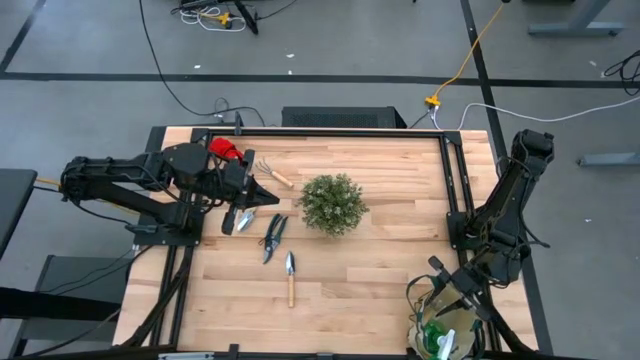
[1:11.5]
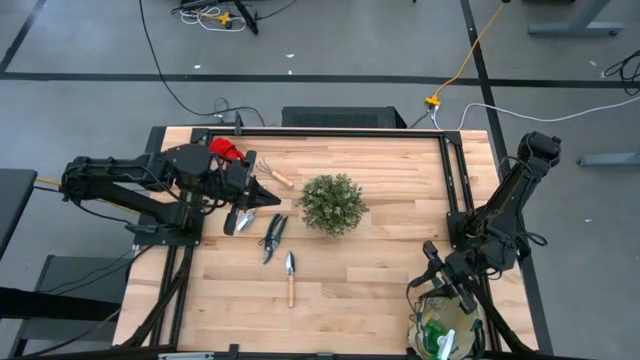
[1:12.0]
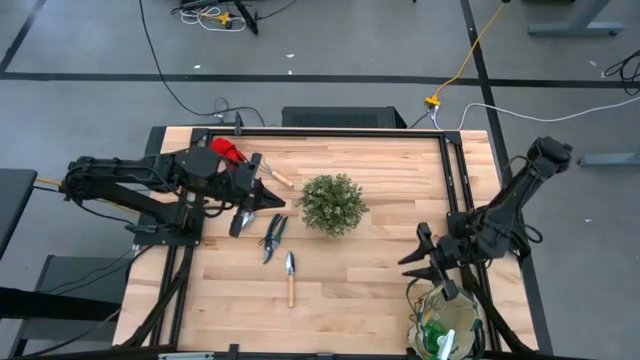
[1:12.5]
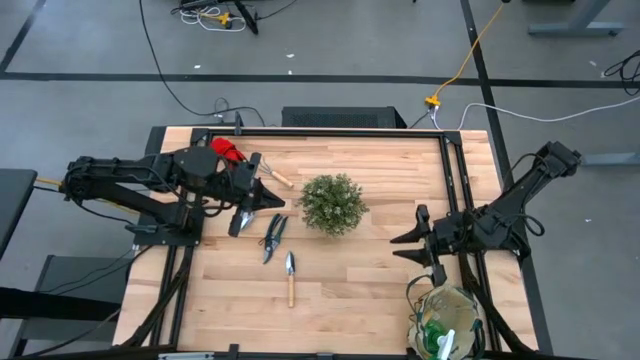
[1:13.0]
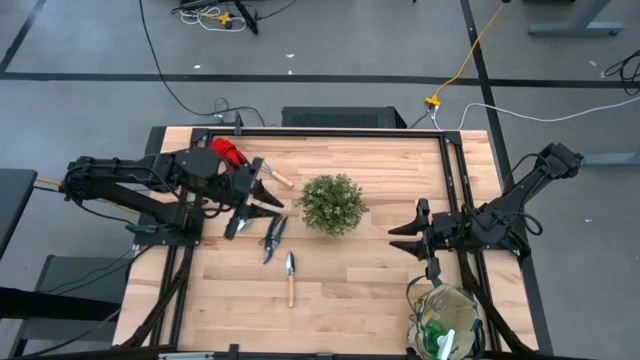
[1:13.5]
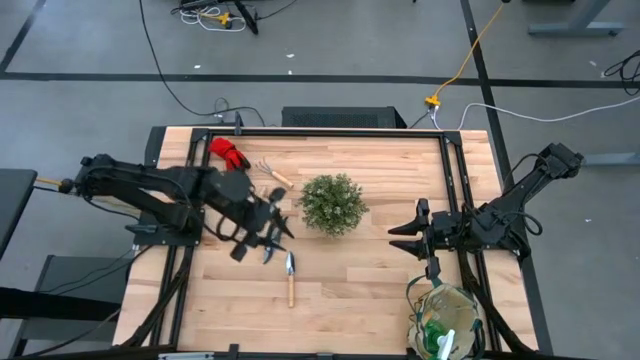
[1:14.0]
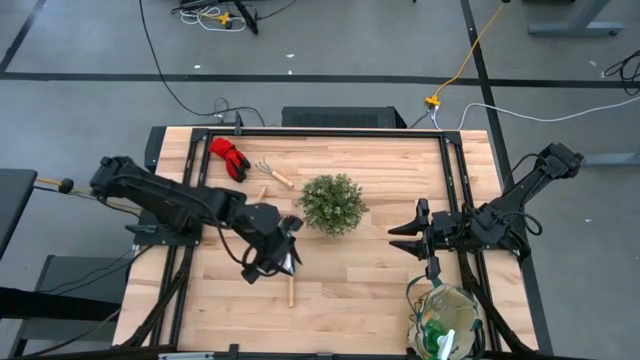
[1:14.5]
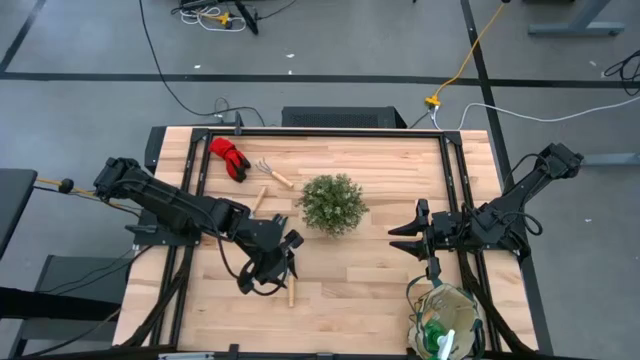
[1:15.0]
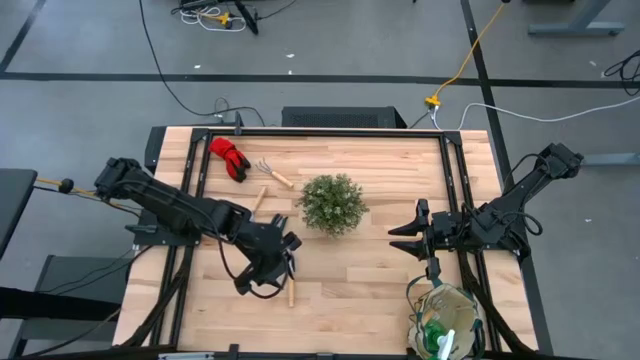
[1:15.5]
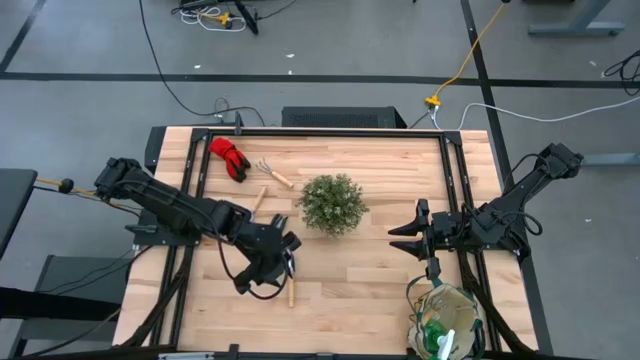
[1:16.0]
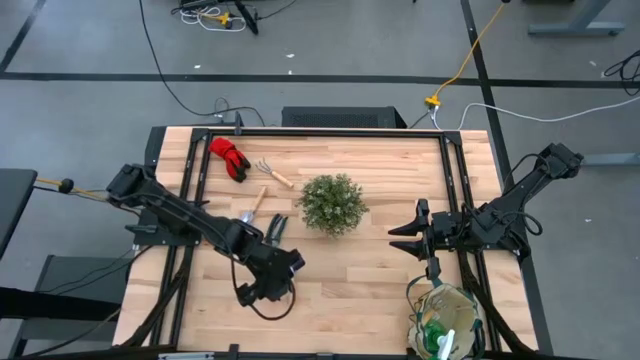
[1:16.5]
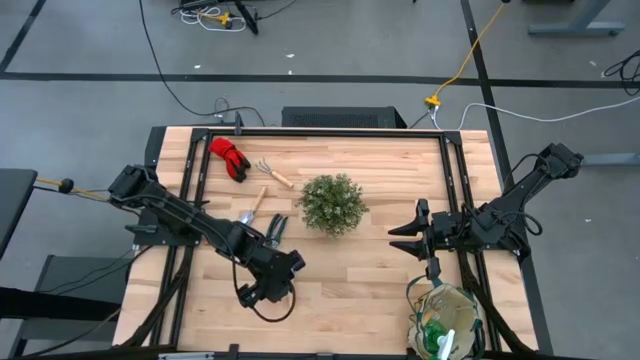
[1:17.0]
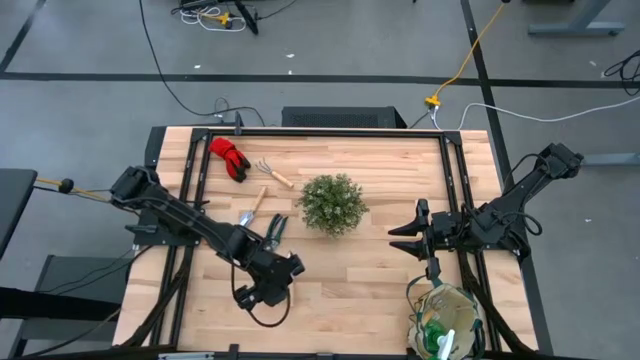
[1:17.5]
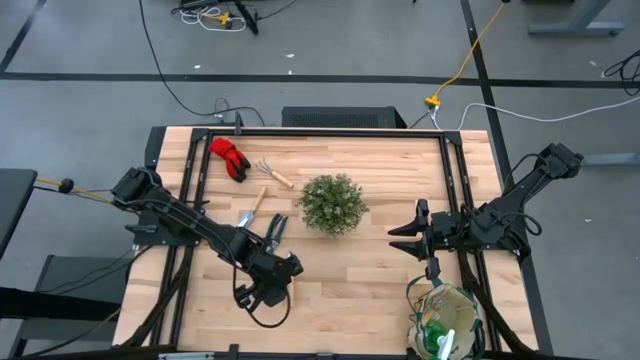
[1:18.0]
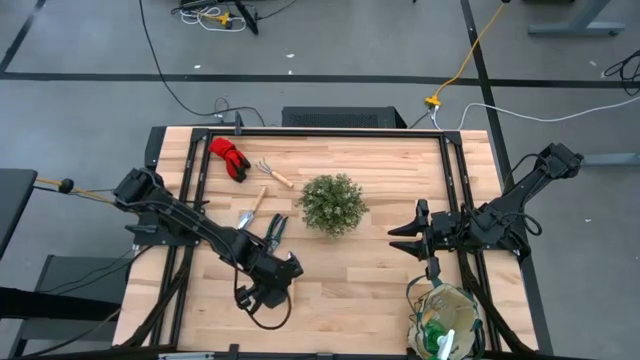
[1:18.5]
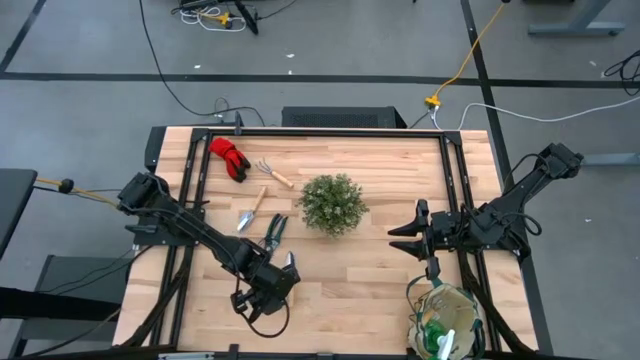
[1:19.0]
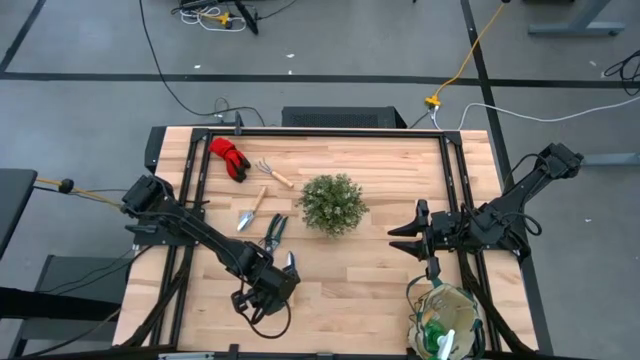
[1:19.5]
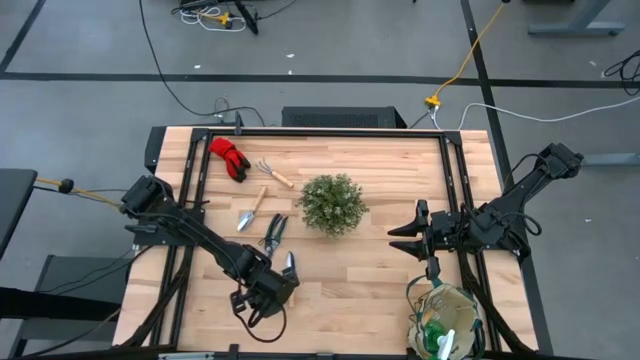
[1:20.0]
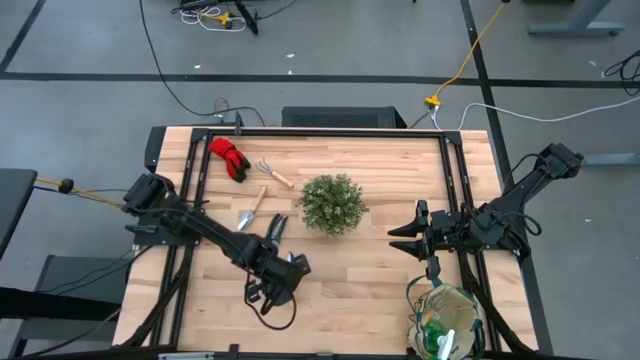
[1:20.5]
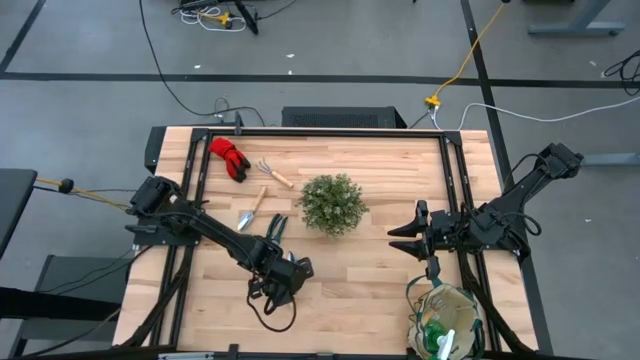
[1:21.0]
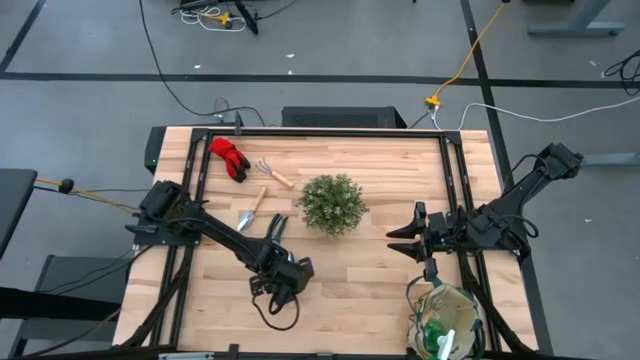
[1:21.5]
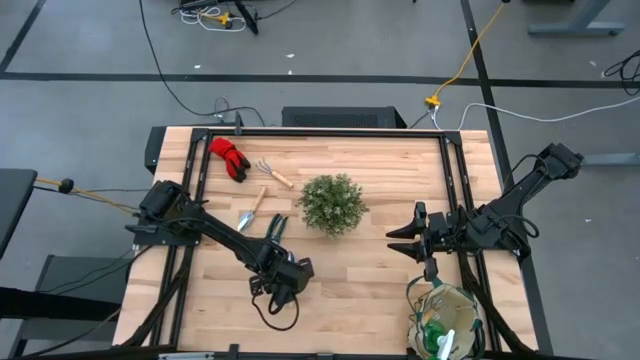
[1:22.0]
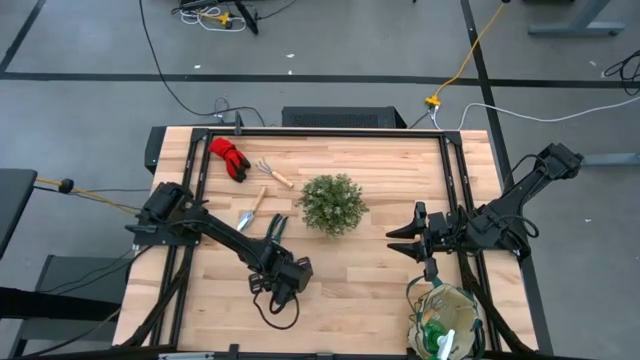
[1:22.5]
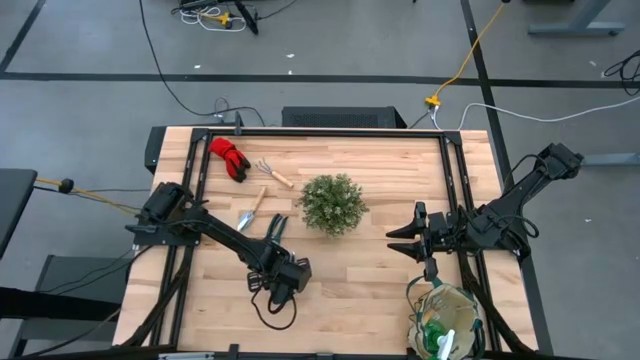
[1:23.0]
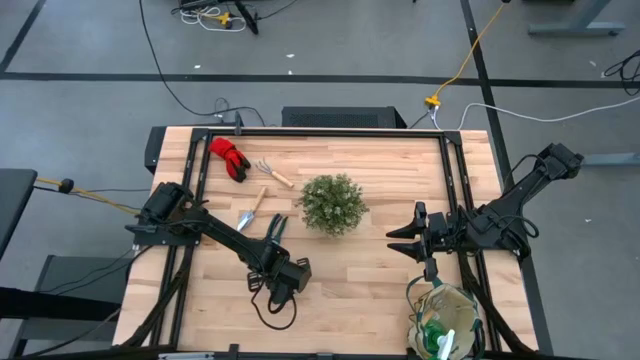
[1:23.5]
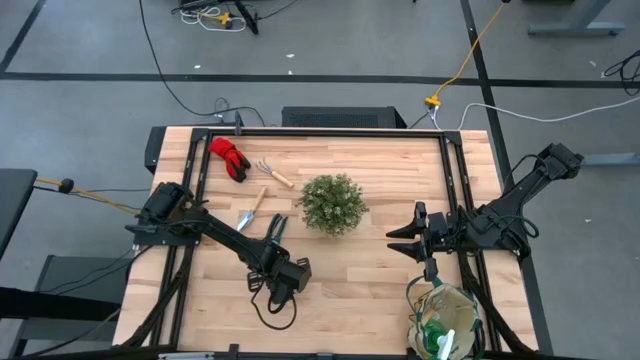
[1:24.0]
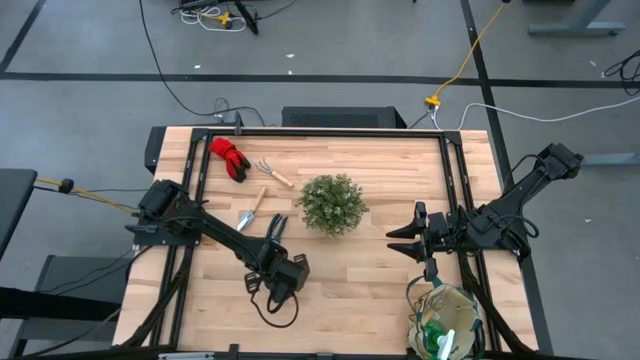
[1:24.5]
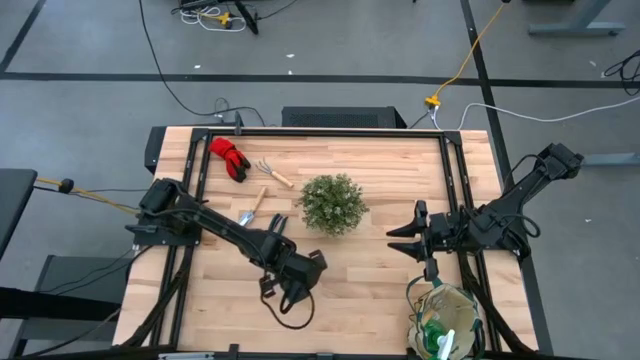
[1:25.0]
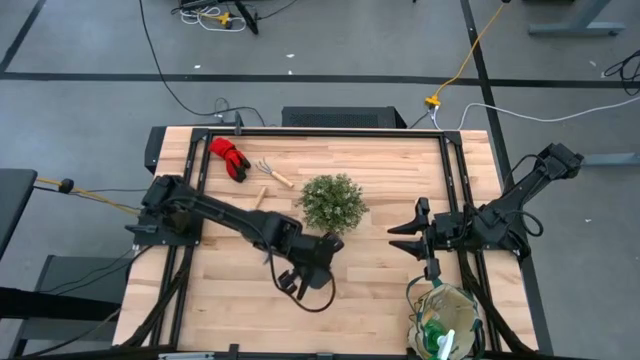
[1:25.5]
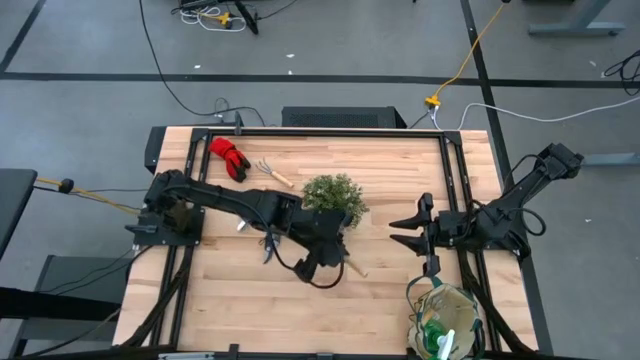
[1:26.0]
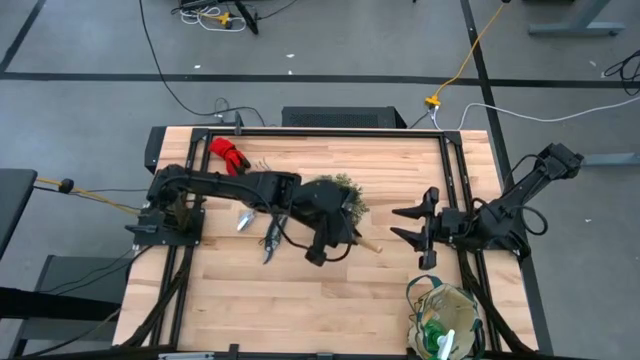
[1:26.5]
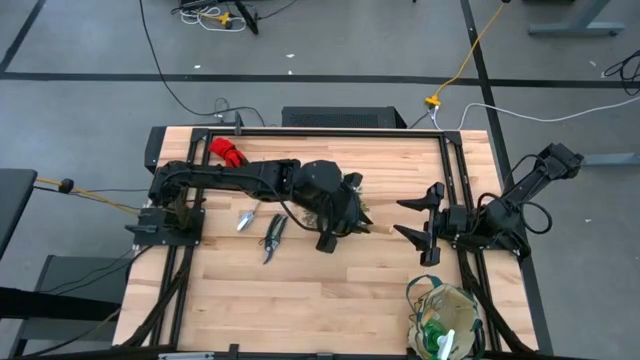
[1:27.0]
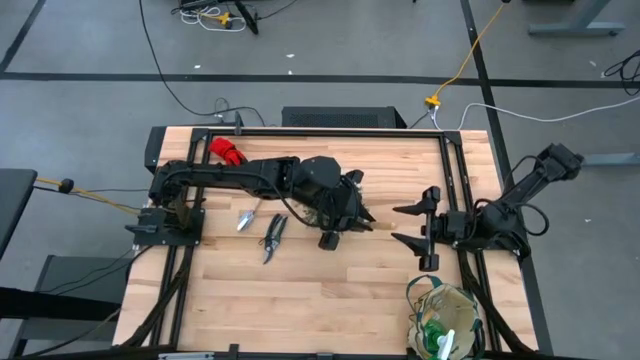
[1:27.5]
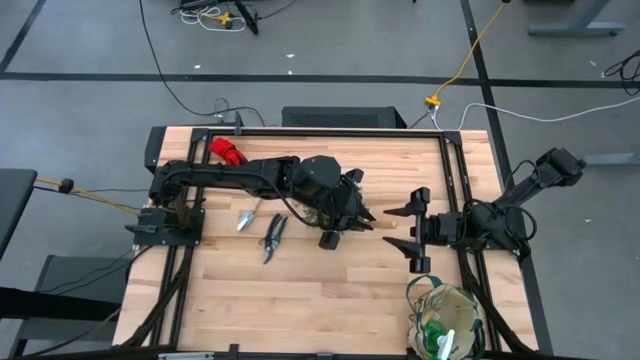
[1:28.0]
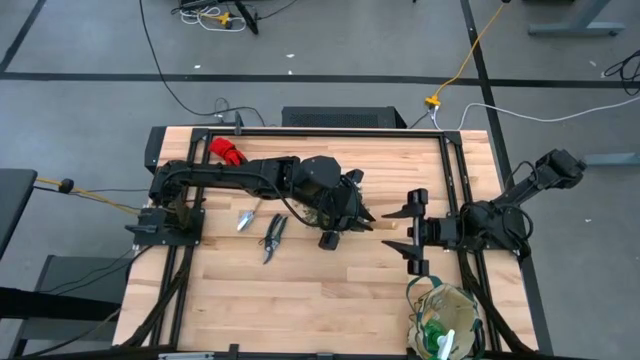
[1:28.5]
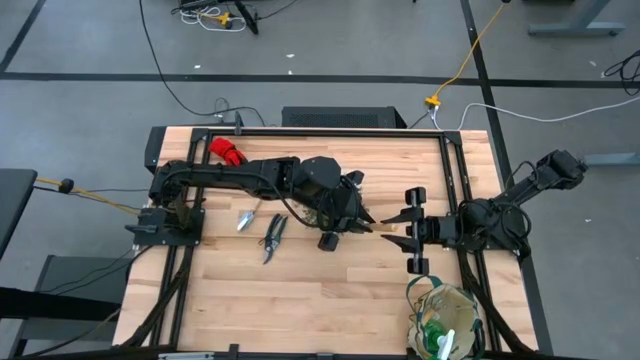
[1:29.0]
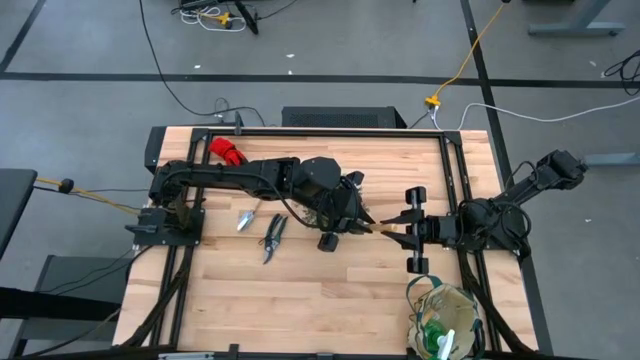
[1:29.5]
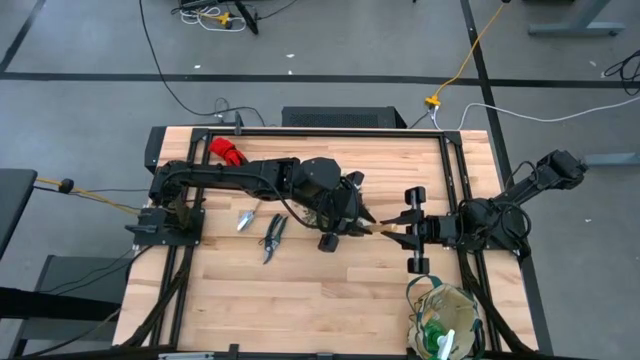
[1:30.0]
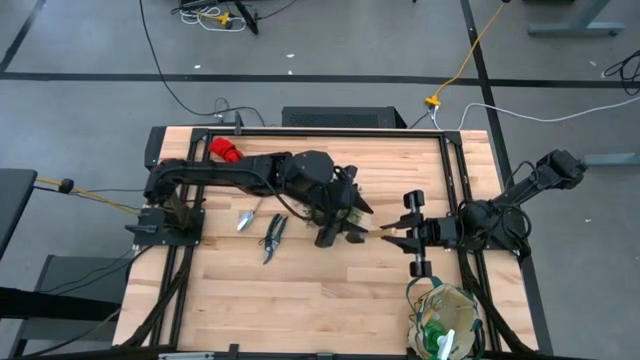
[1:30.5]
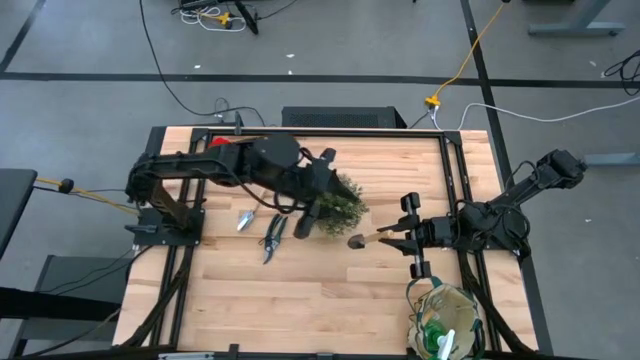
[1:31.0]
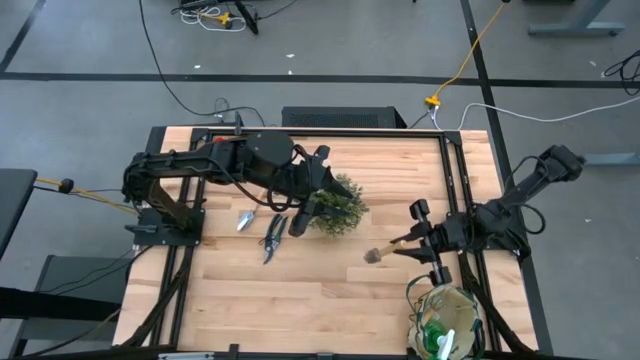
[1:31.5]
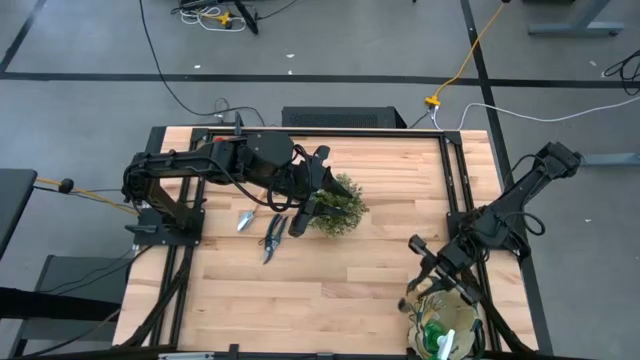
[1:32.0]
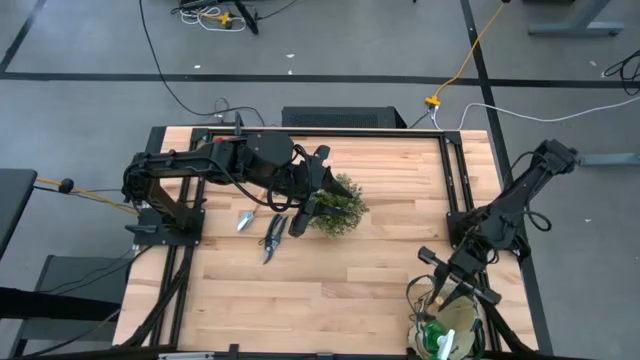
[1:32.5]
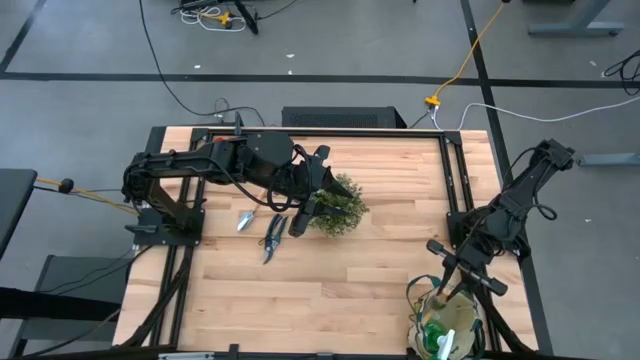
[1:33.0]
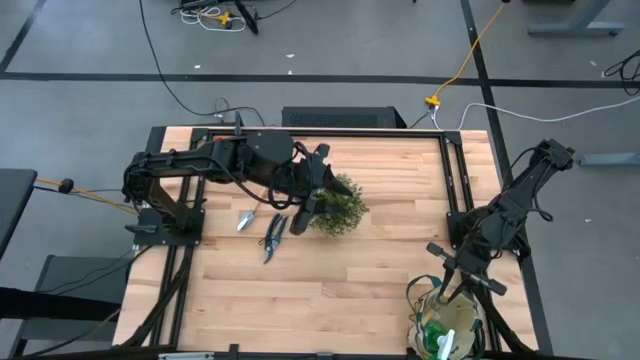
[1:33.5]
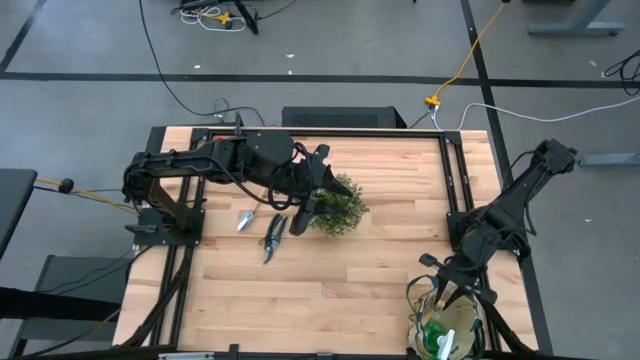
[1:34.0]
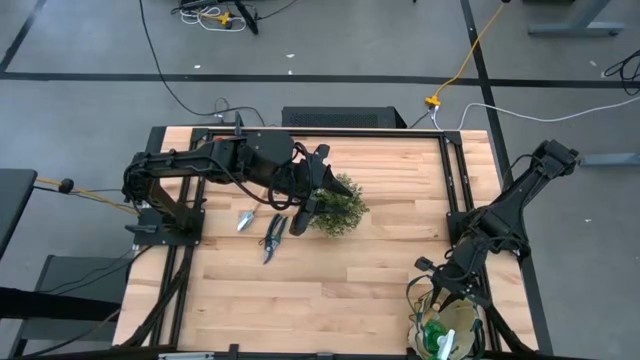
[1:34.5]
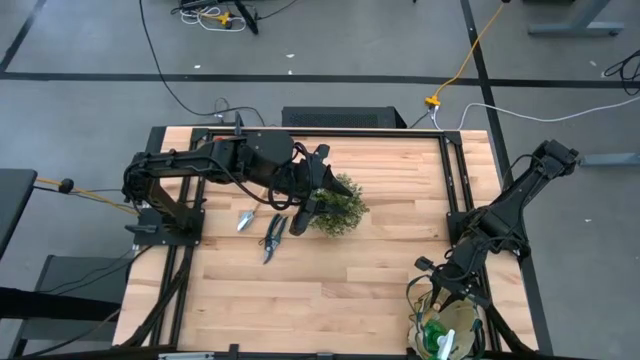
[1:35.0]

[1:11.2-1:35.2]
Task: Pick & Place Garden tools in Gardening bag
Put the bottom hand trowel into the white gardening bag
